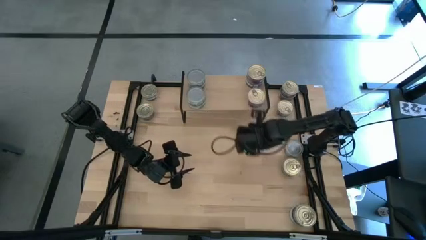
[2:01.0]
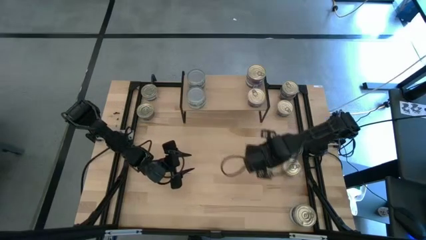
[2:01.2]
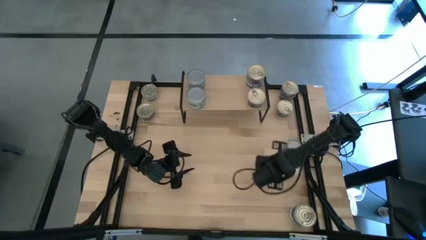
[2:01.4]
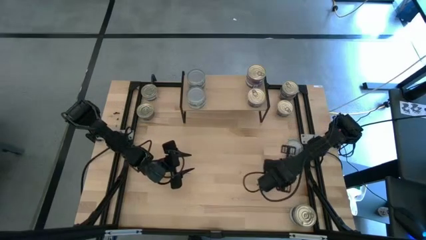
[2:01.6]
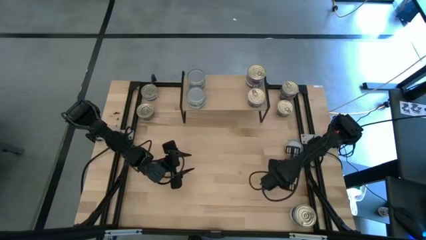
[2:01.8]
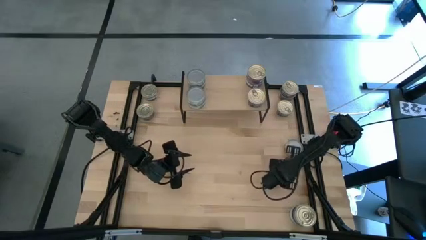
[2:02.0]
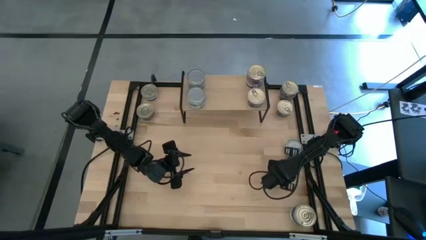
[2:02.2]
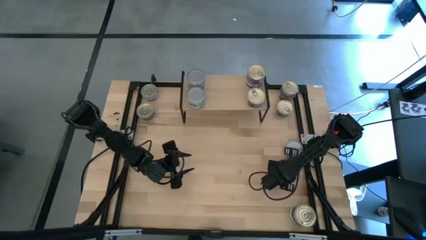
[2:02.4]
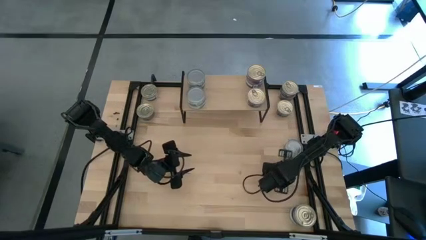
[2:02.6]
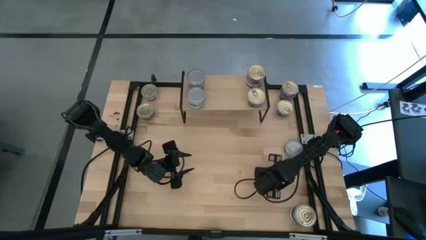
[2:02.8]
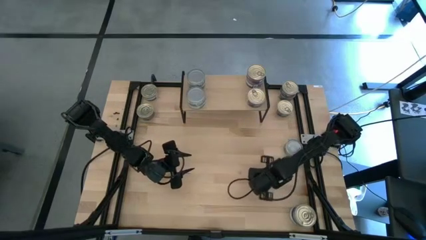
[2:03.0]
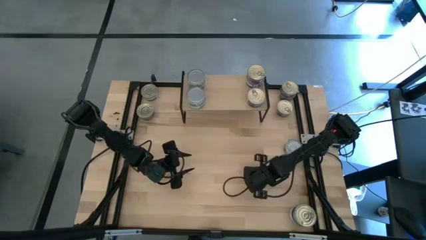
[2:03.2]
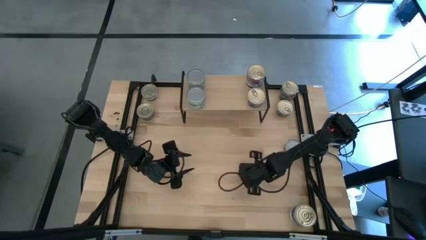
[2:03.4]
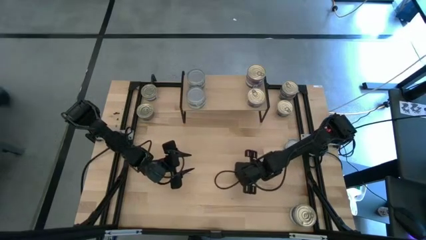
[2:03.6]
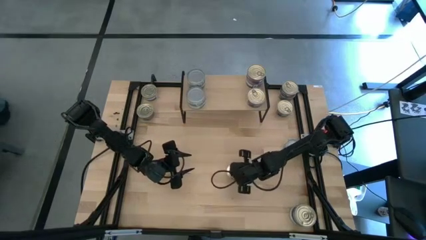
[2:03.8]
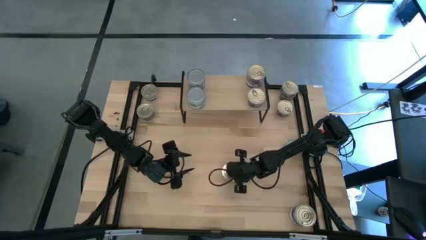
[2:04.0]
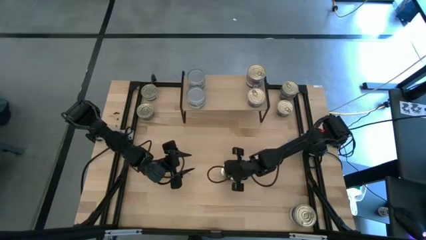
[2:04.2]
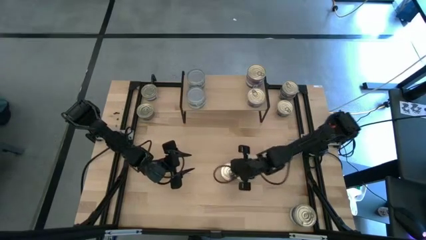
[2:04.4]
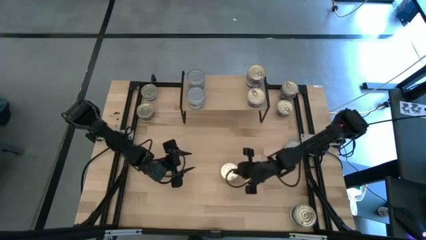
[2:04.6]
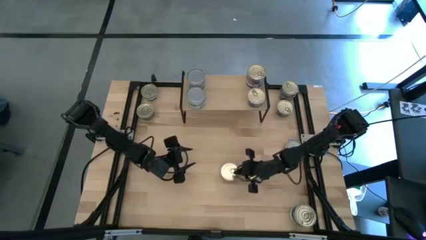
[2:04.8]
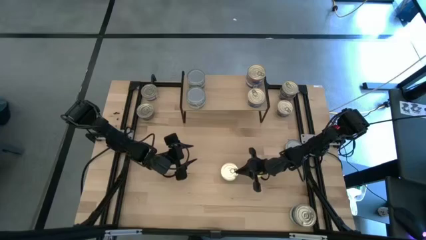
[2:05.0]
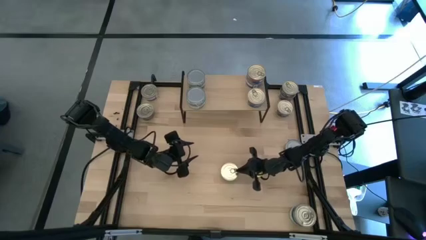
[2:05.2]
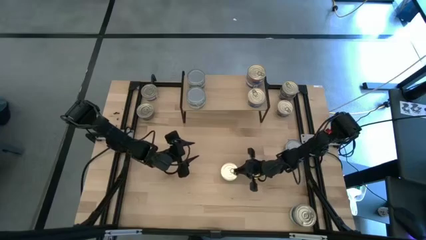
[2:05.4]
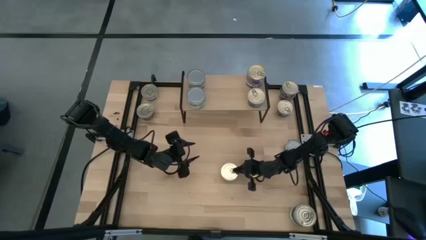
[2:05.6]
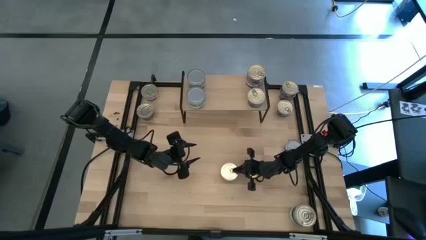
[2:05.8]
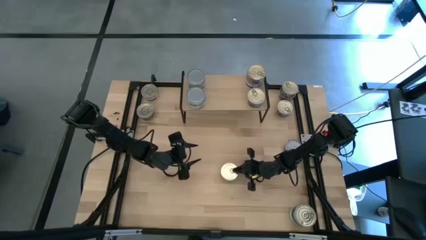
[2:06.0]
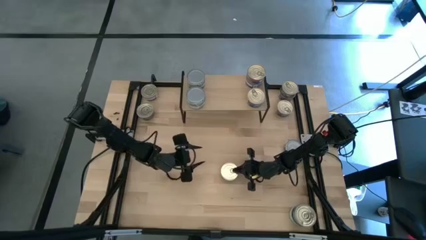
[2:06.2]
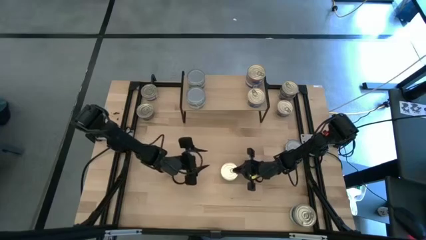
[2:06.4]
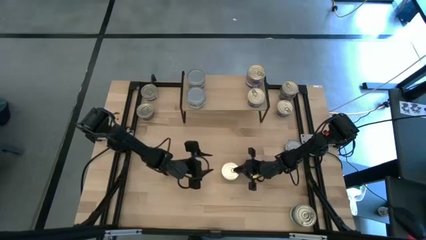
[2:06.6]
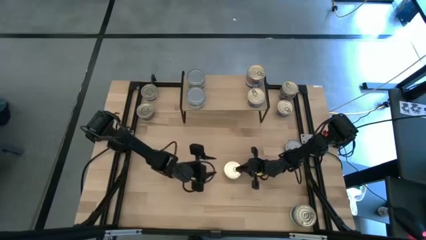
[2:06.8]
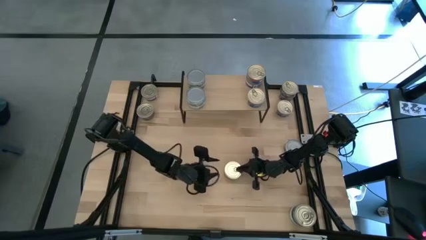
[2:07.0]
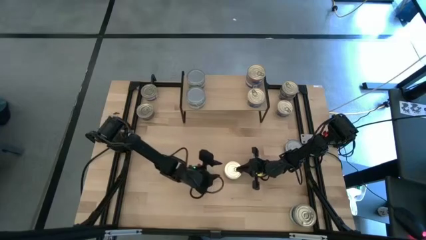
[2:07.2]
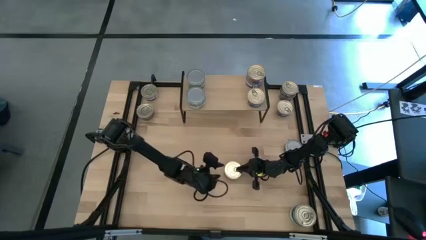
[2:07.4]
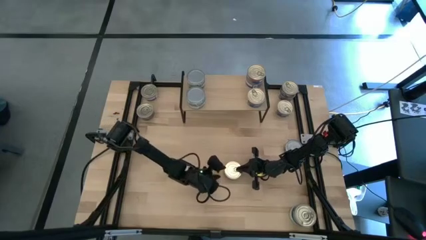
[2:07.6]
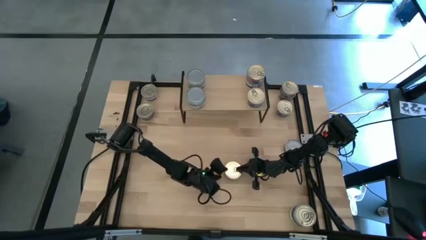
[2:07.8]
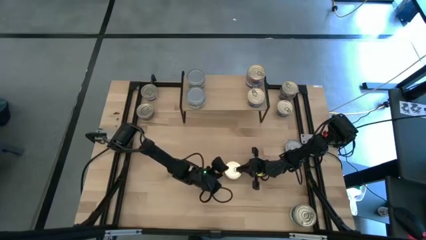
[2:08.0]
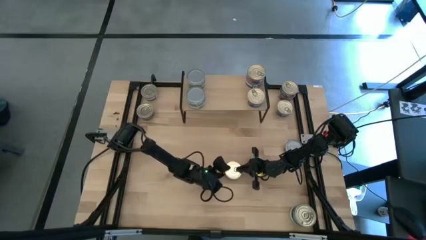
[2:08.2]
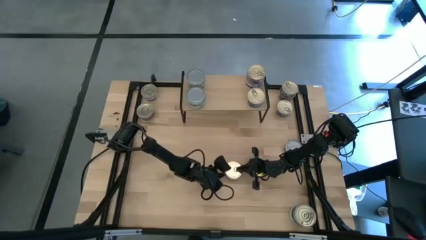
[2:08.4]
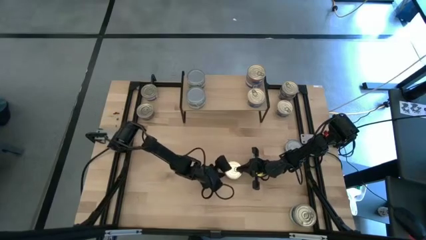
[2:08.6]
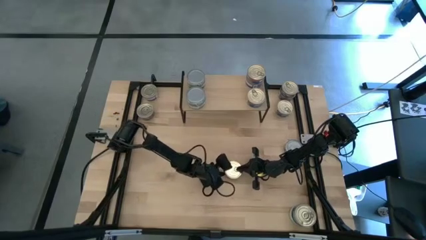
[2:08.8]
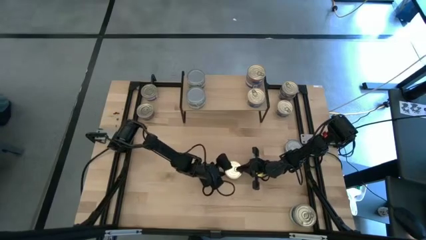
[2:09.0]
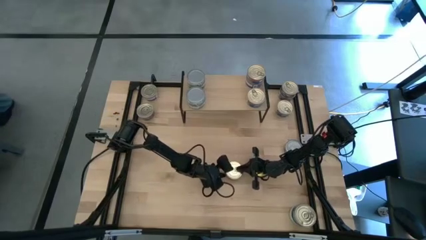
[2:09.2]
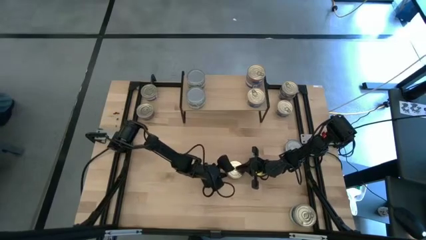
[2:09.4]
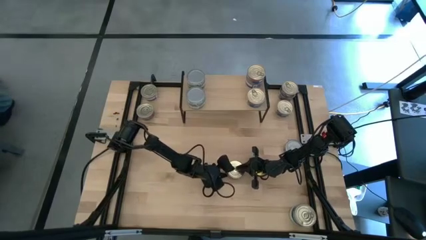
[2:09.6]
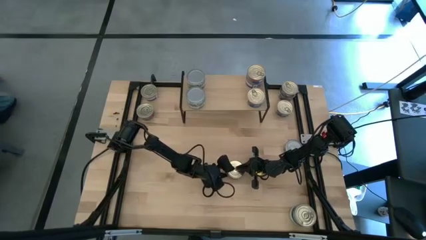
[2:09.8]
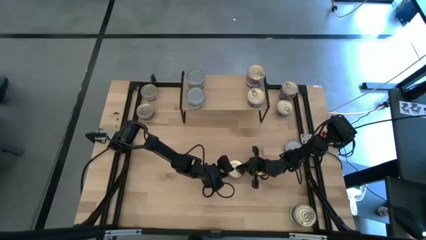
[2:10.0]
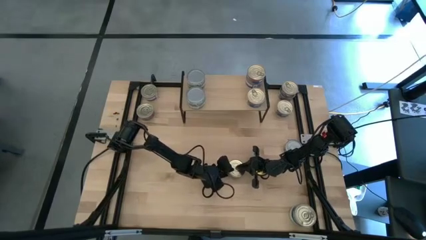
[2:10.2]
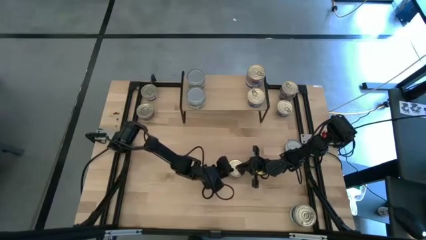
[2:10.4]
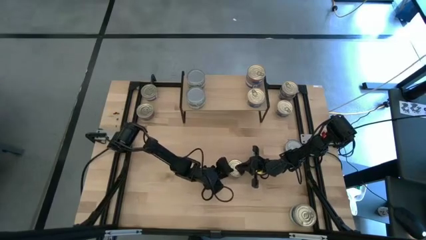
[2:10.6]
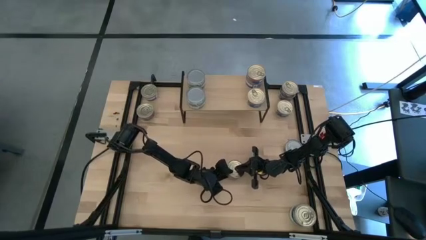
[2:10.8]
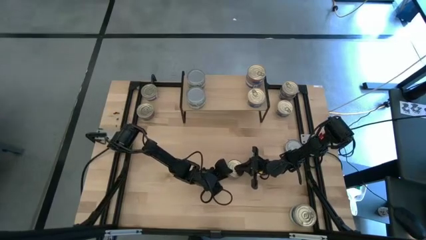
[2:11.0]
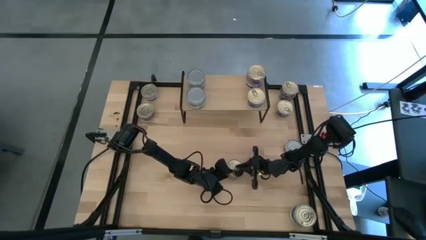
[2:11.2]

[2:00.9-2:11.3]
Task: Stack canned seafood by type on shelf
Stack the blue pink tuna can on top of the blue pink tuna can on the shelf

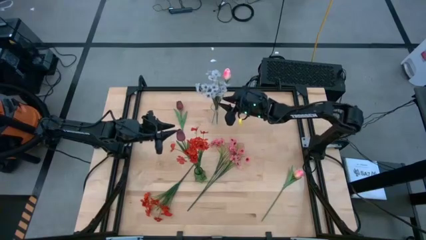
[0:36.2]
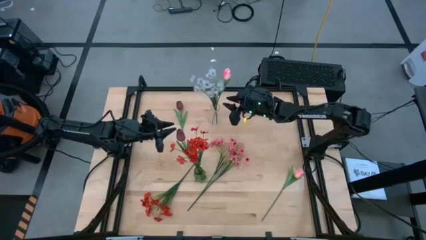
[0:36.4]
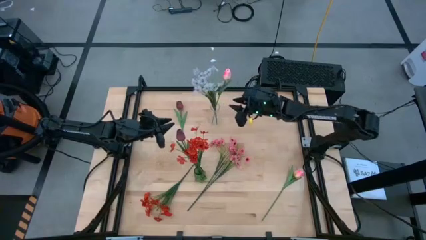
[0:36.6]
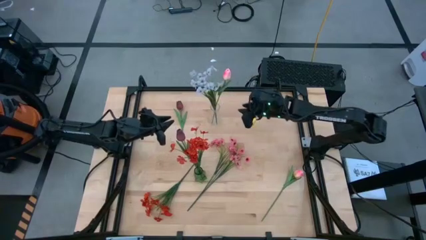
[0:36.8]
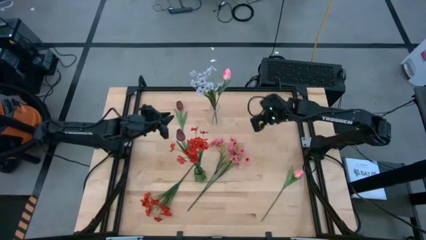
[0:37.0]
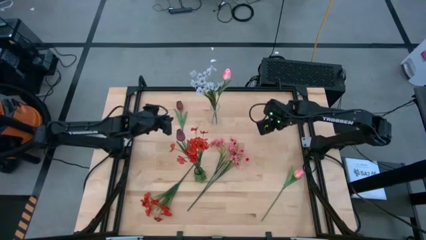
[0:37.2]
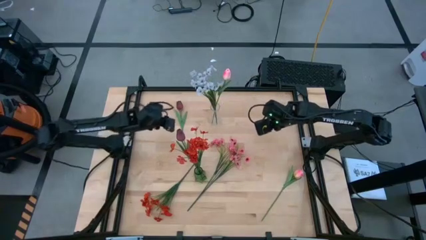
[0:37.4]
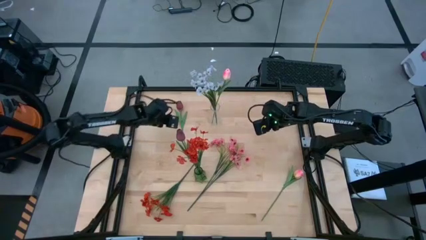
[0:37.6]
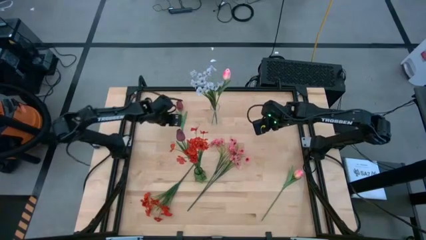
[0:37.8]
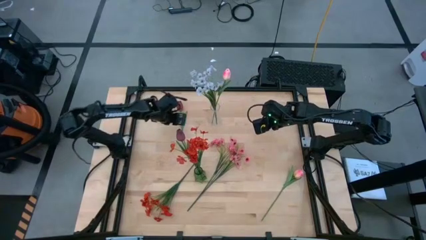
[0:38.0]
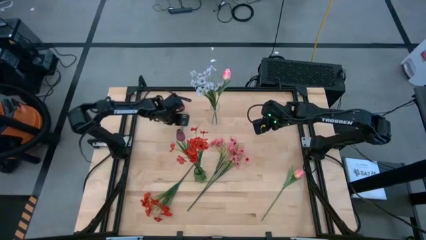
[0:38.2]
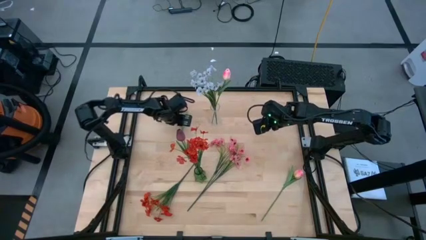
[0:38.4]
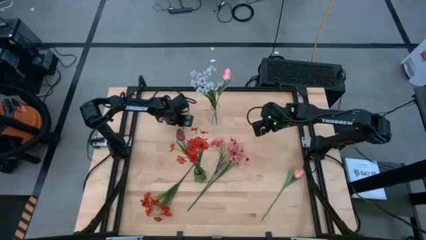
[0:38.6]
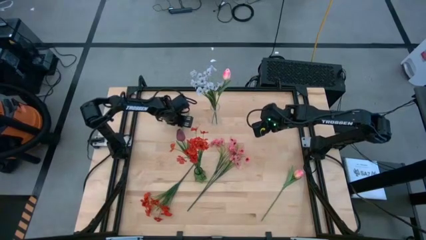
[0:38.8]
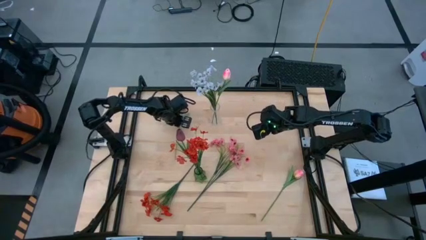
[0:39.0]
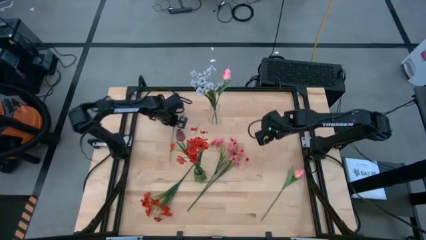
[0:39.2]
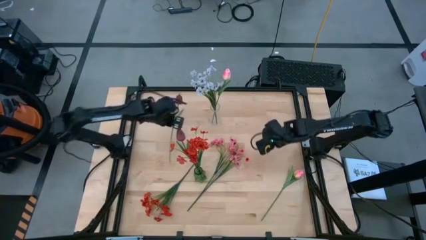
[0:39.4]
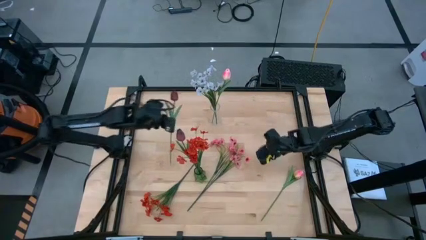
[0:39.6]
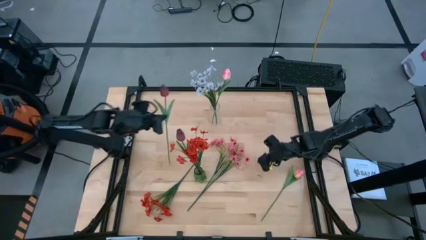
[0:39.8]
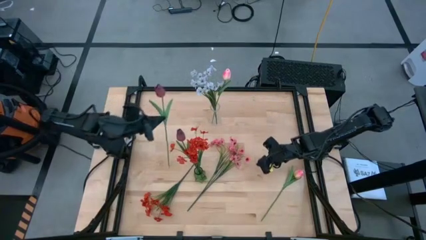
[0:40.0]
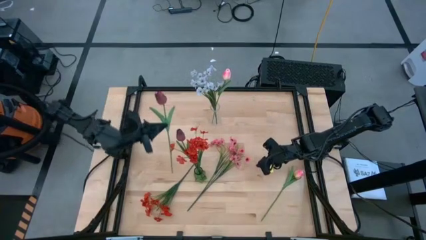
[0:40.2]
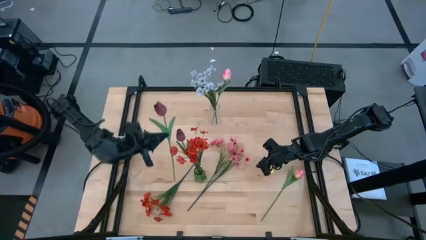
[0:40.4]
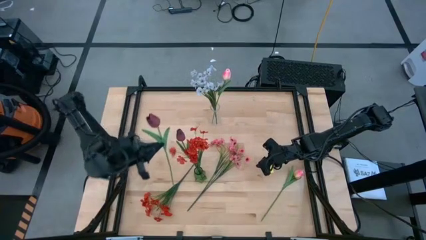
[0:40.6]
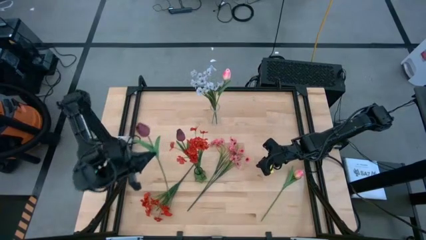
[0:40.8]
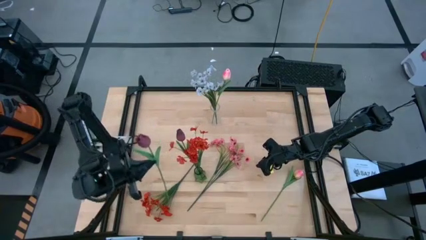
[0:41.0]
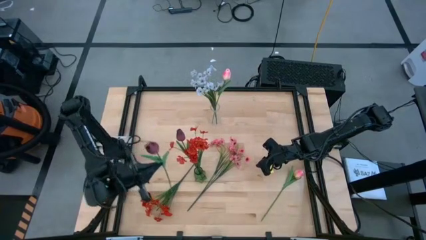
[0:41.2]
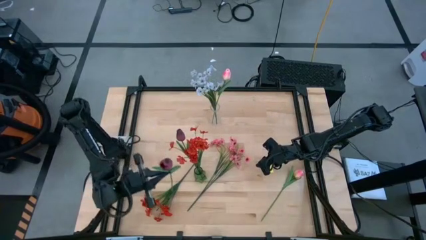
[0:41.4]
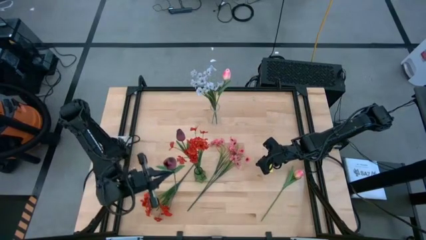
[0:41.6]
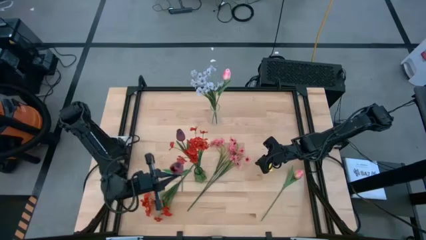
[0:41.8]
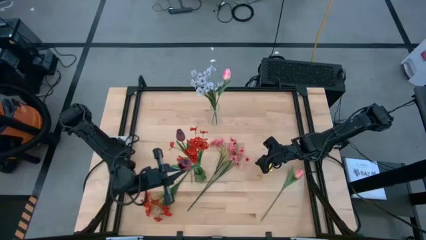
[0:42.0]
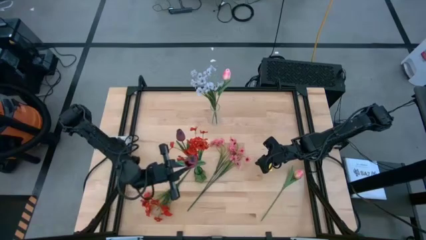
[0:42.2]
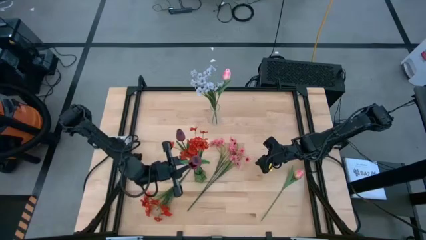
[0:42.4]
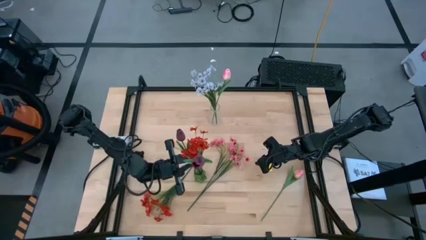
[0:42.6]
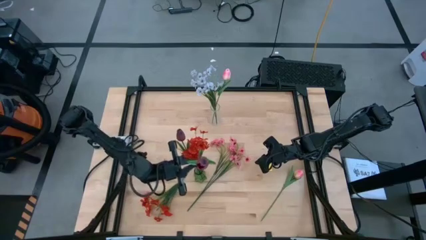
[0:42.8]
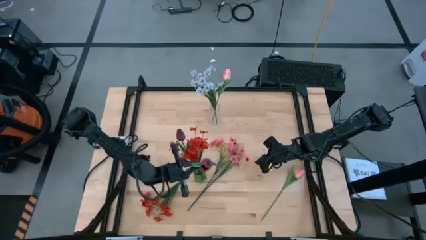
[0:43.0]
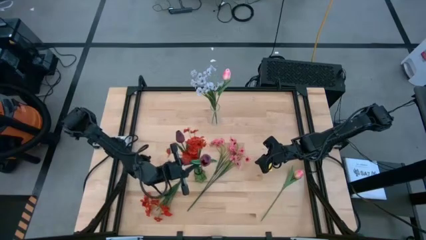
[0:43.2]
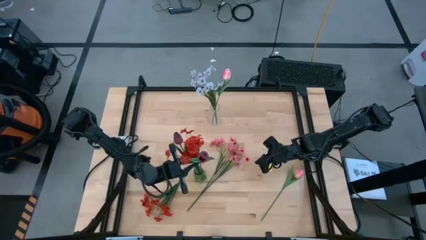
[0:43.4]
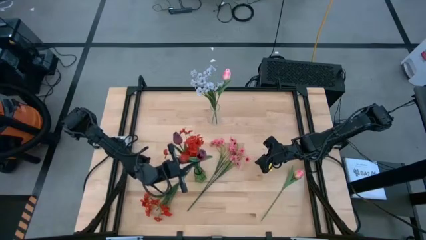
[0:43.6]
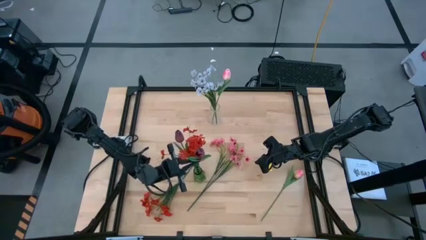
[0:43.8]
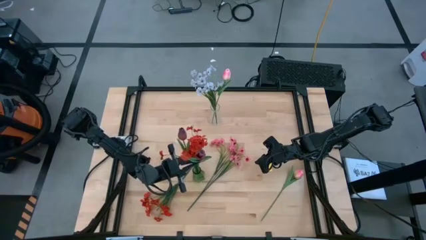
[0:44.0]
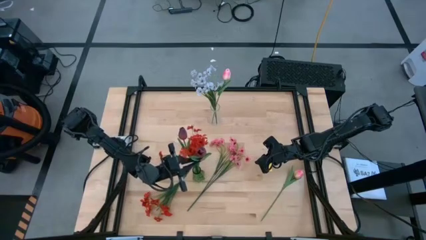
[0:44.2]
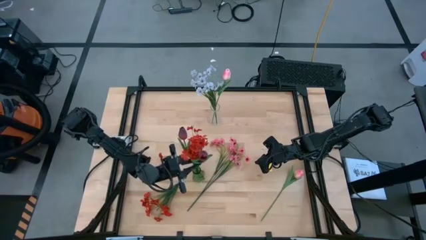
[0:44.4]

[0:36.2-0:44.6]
Task: Sort flowers into vase by color
Put the red flower into the green flower vase
